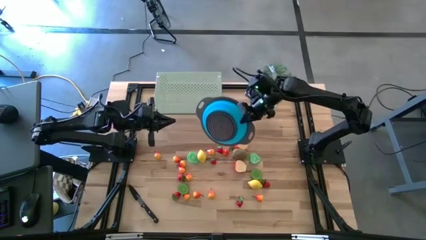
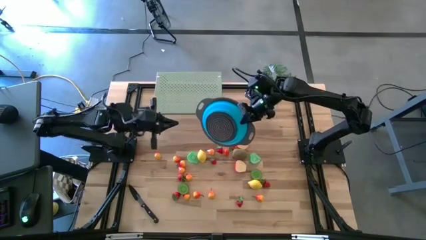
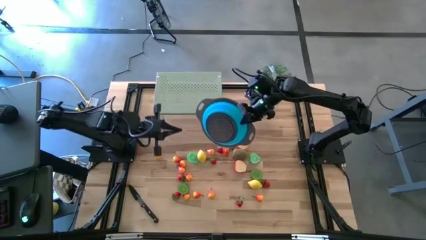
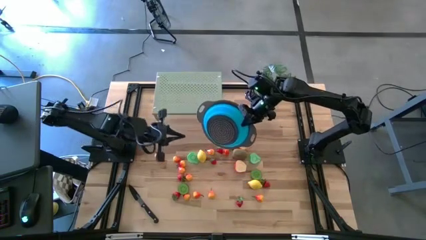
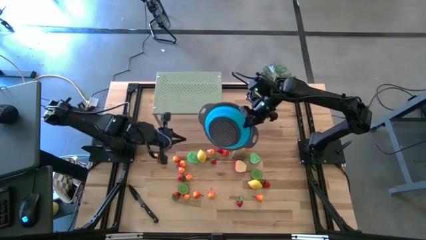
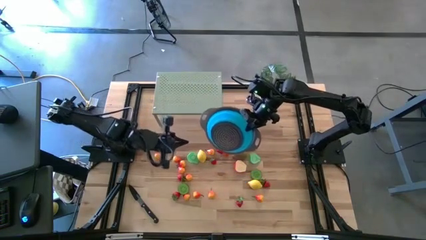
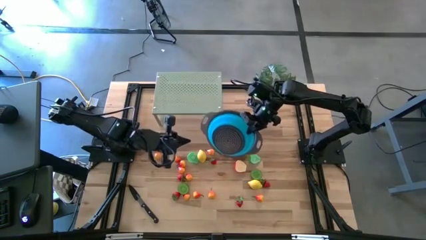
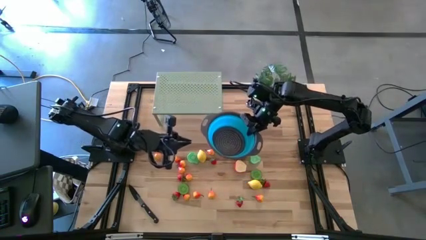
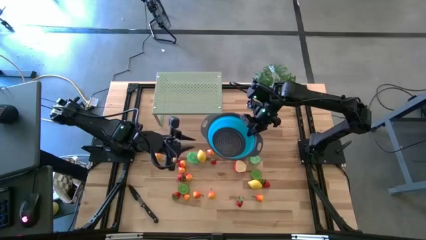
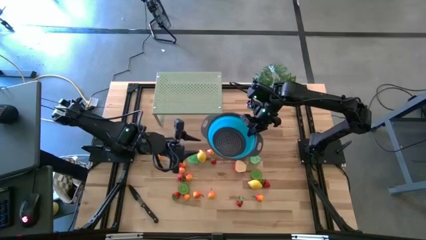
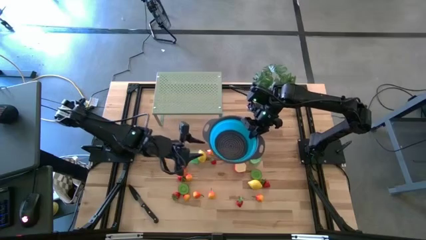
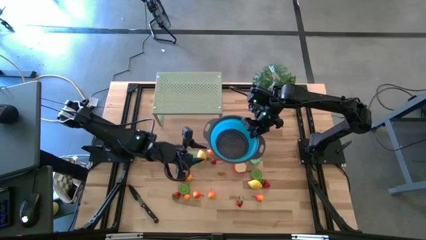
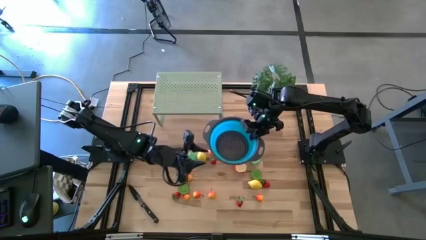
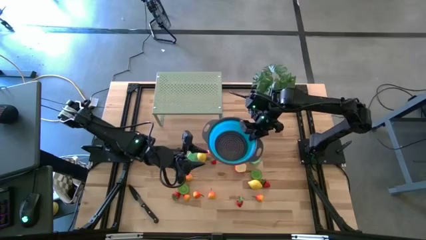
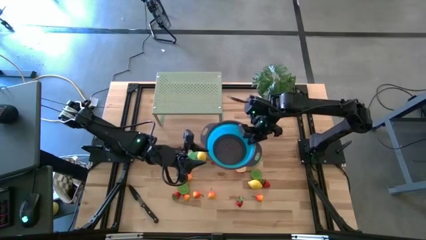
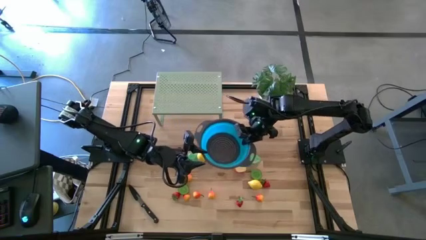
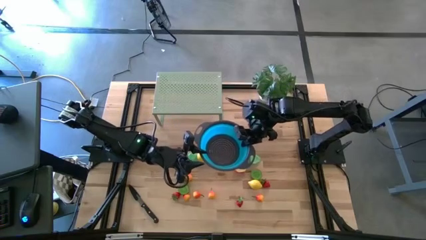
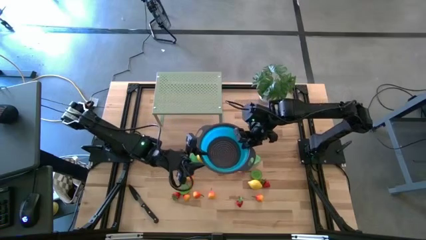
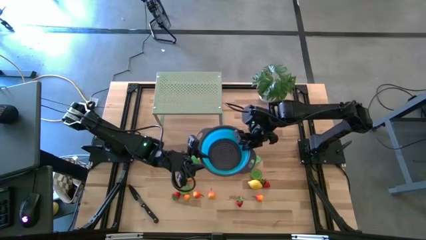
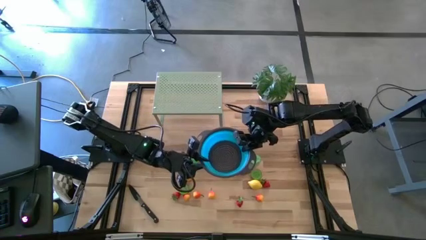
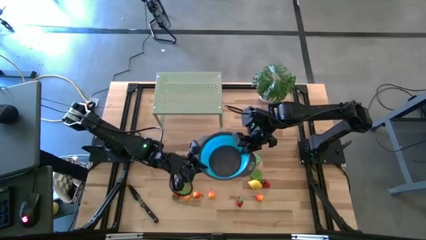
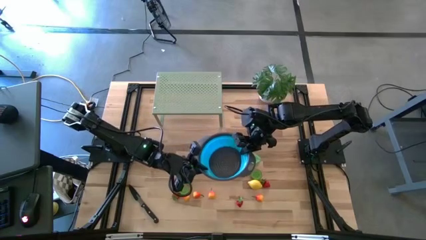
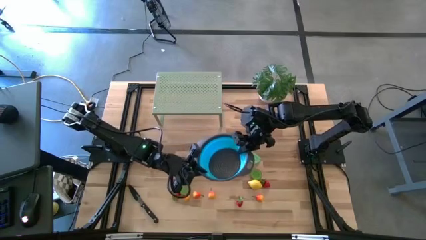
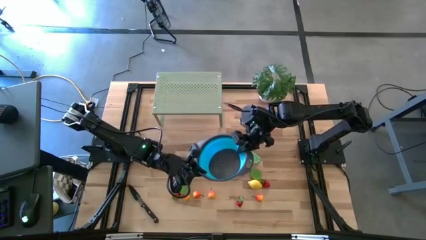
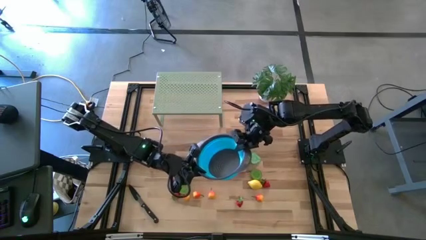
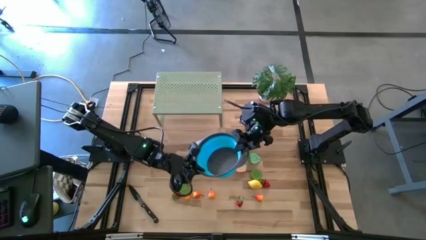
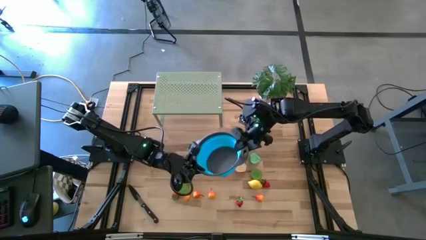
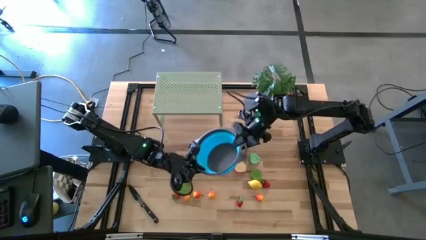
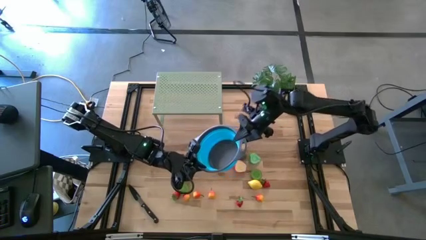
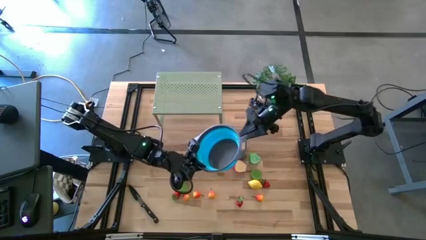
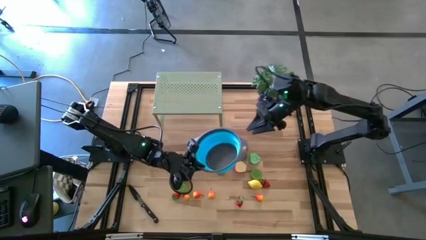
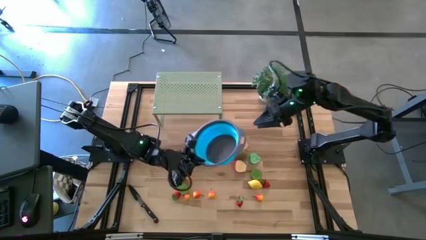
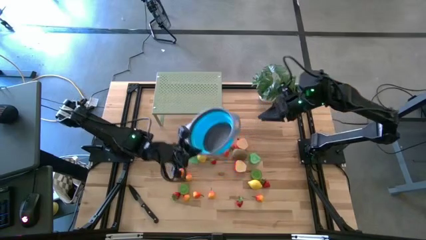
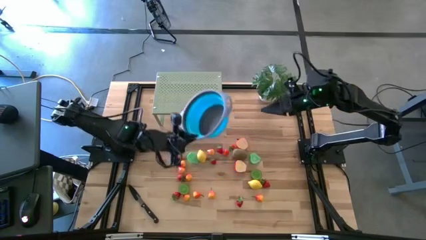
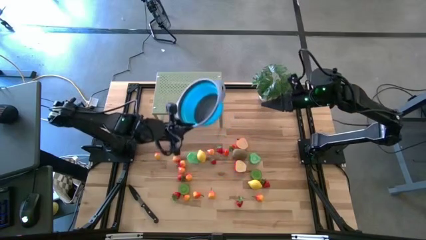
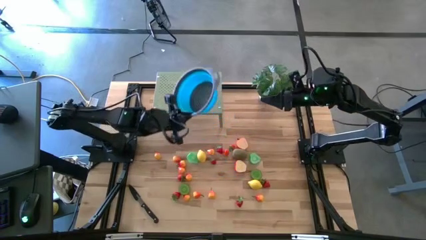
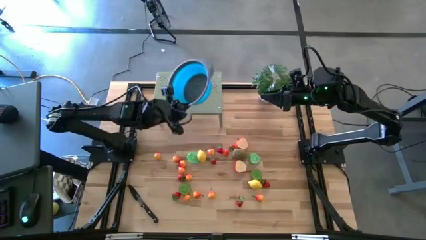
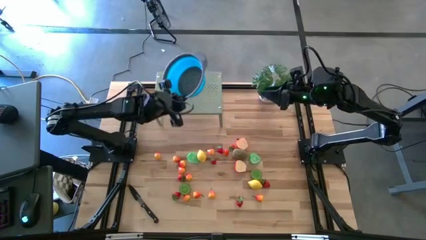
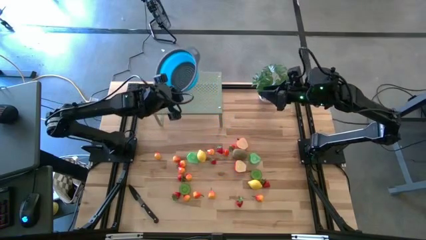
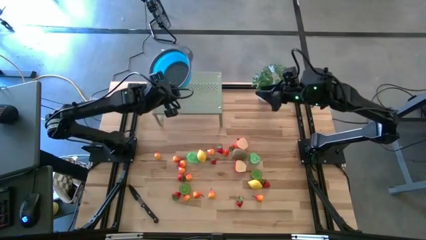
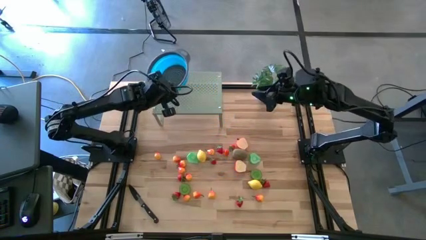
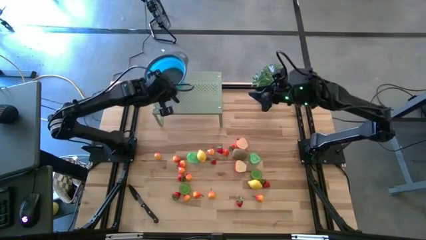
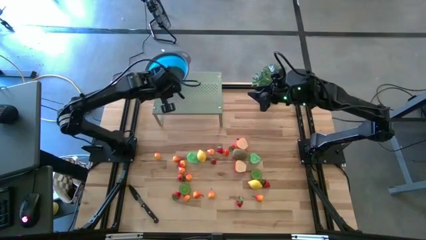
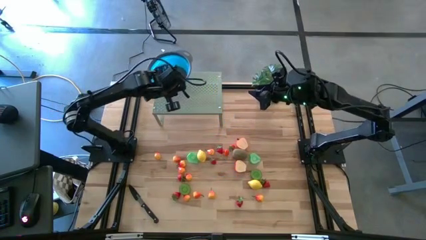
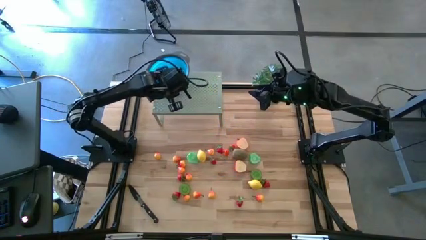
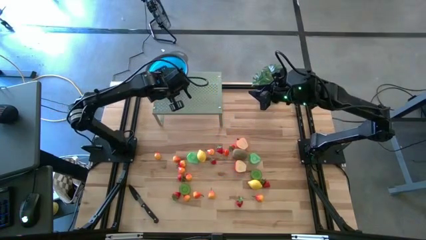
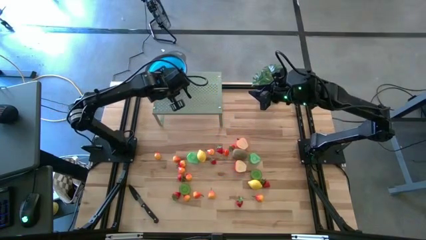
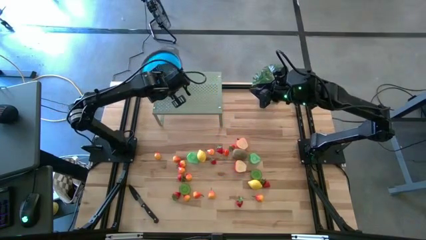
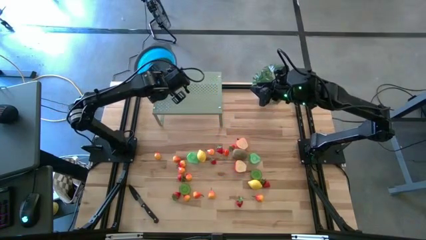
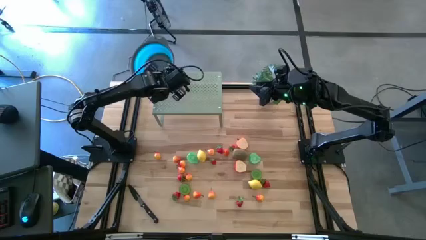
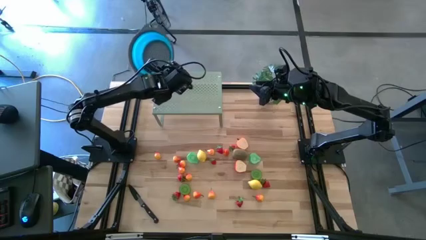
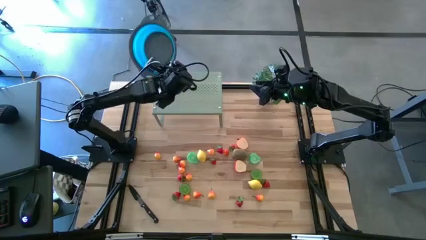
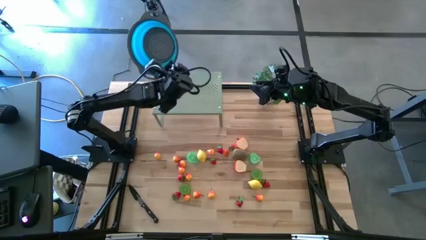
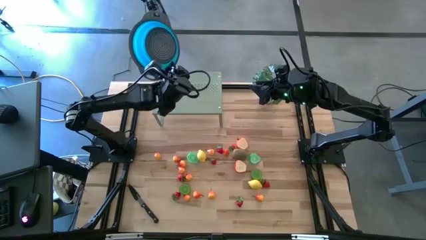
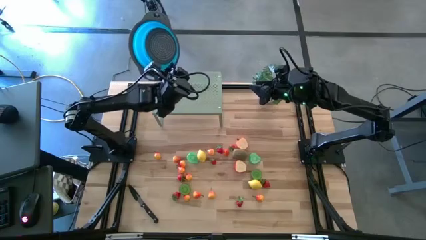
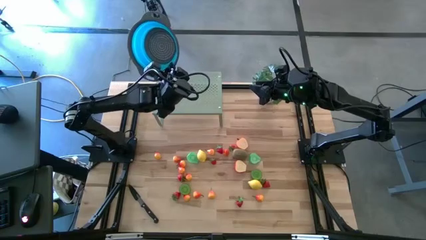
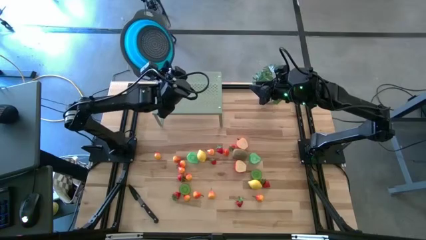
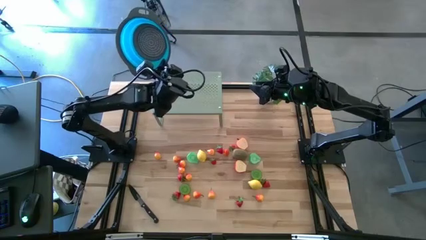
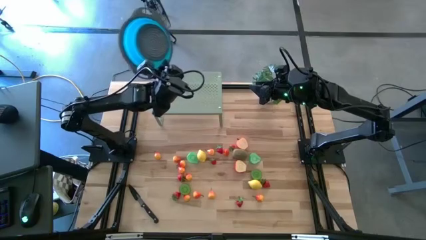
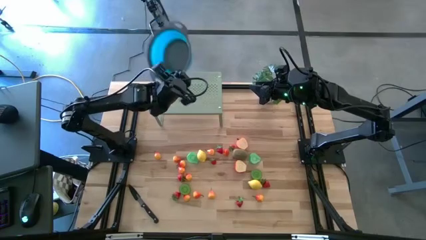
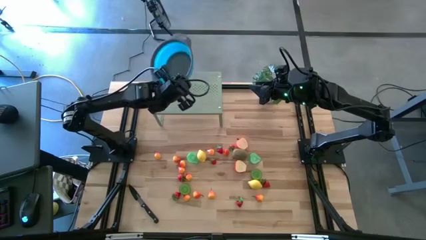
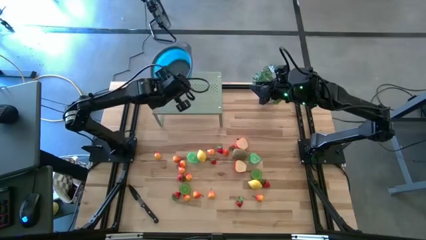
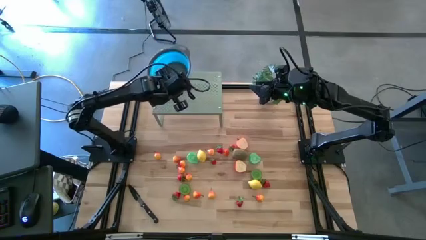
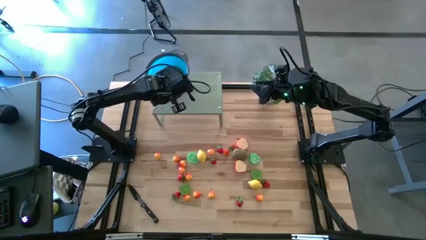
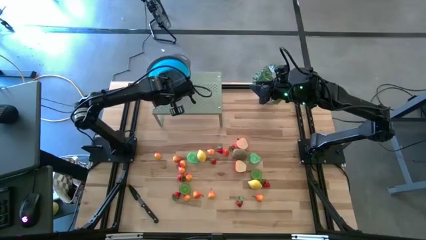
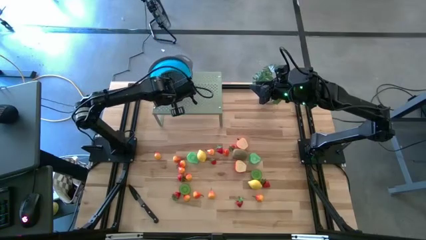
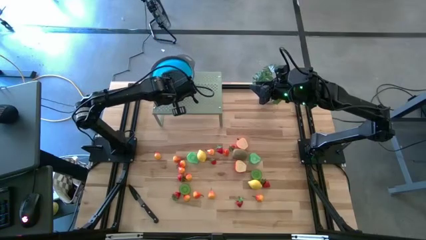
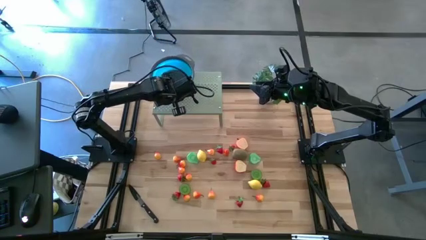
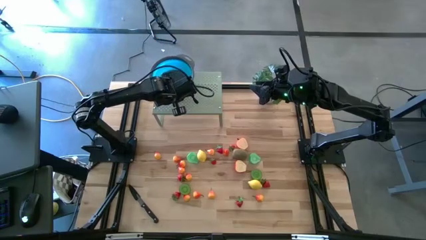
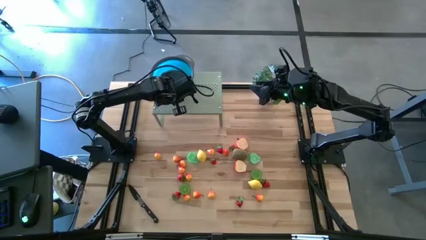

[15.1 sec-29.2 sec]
Task: Pick & Place Fruit
Put the strainer bowl on the shelf
